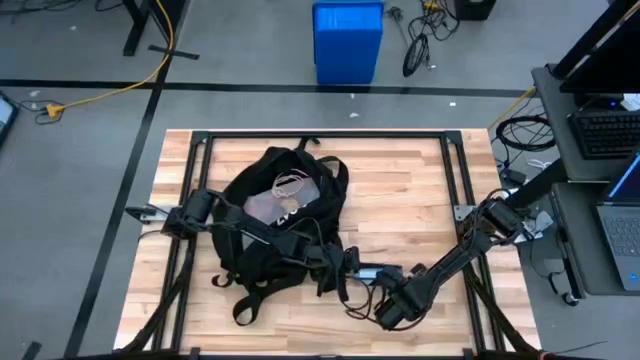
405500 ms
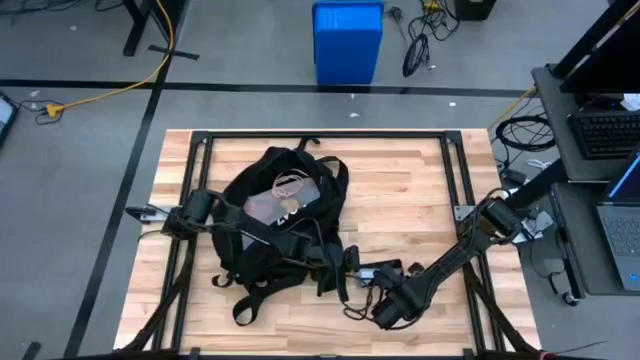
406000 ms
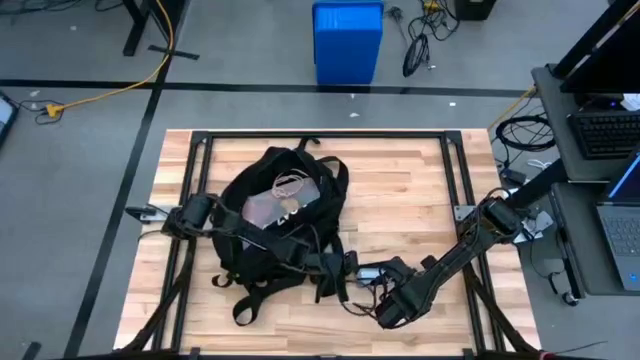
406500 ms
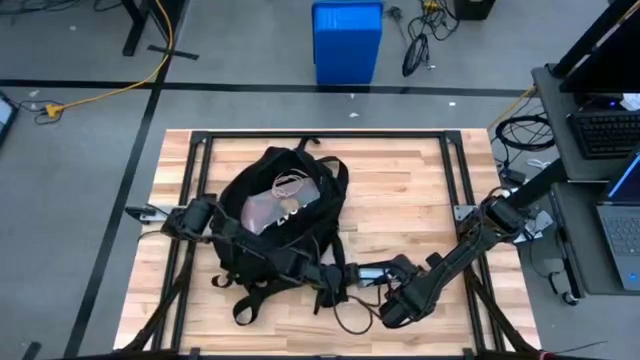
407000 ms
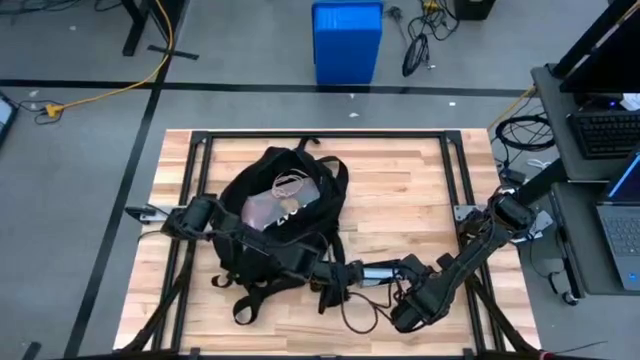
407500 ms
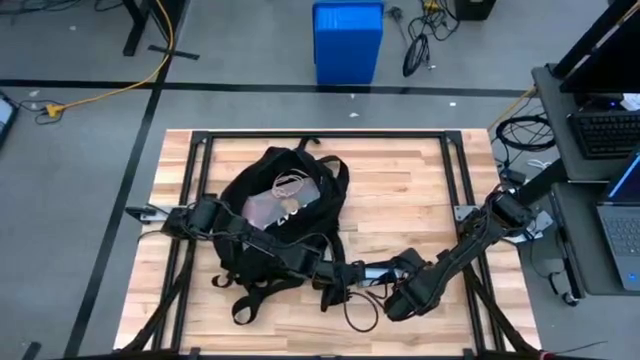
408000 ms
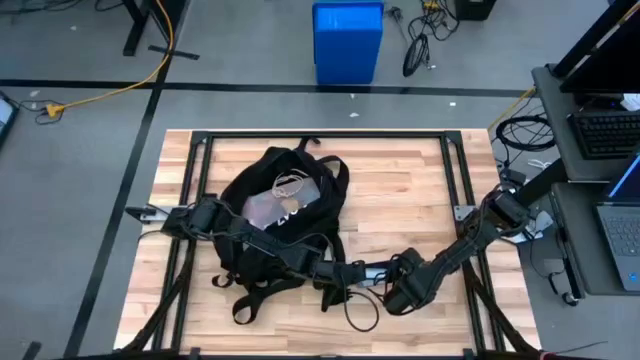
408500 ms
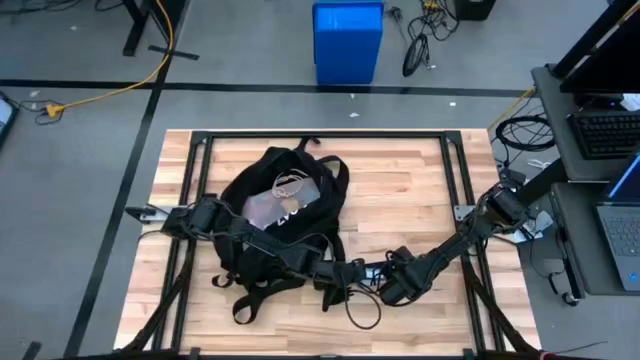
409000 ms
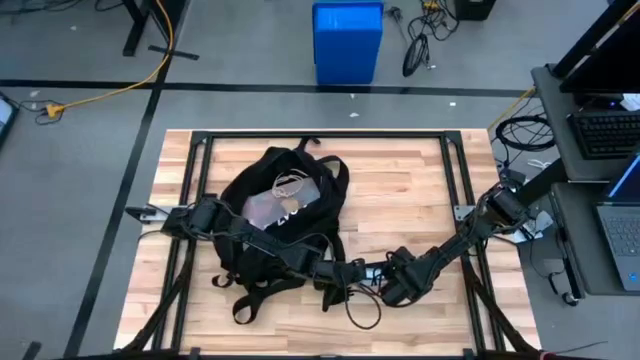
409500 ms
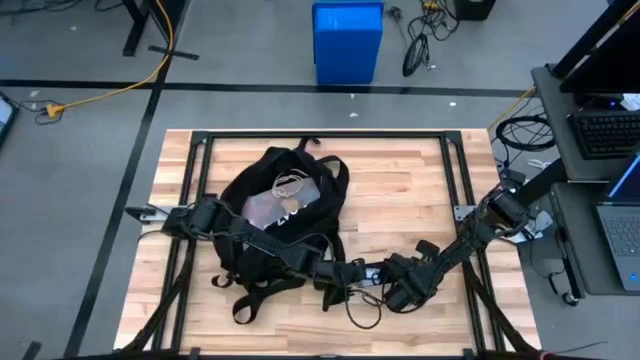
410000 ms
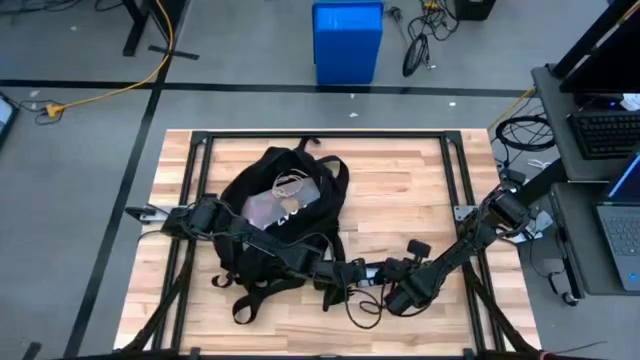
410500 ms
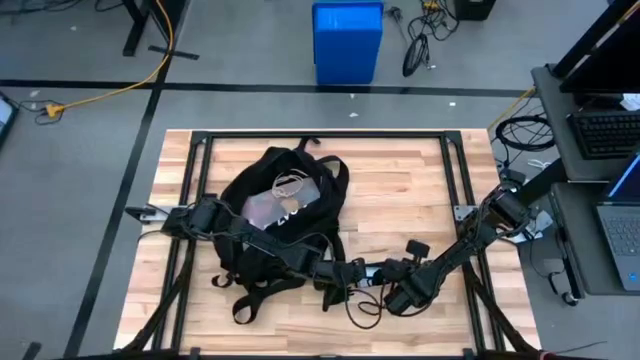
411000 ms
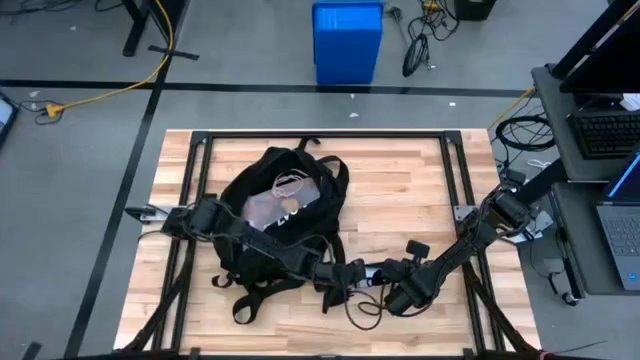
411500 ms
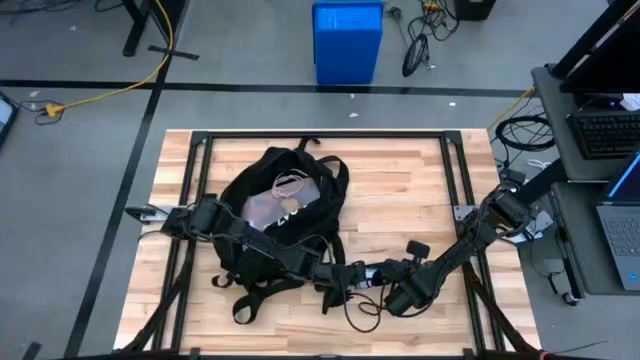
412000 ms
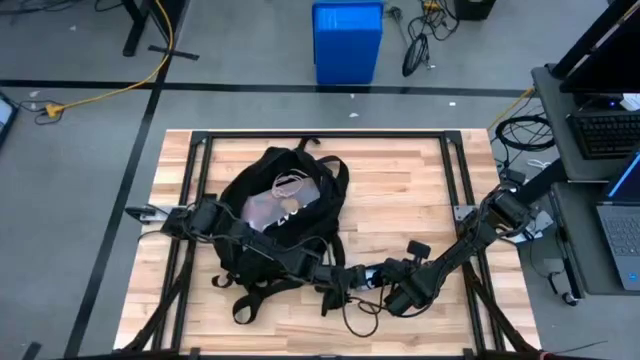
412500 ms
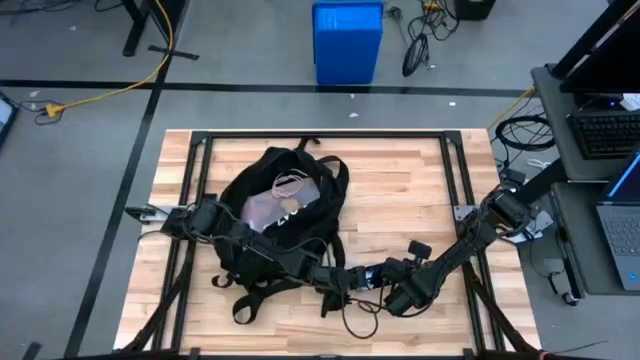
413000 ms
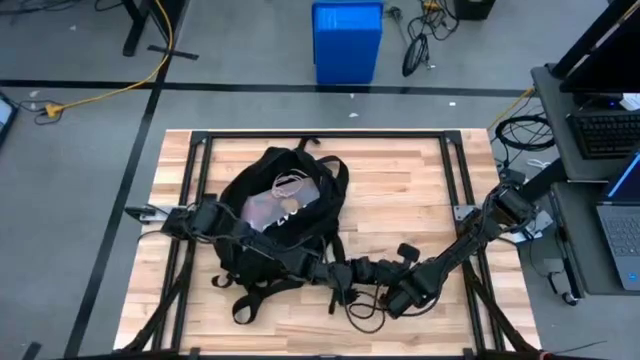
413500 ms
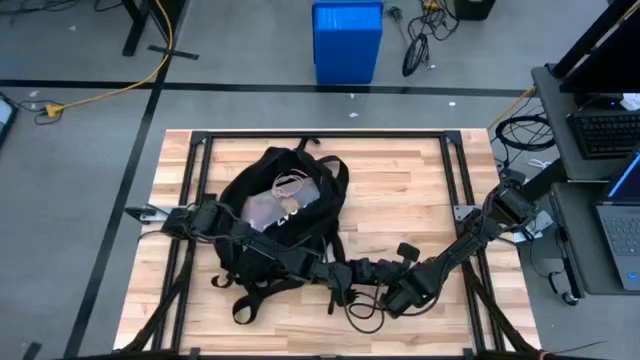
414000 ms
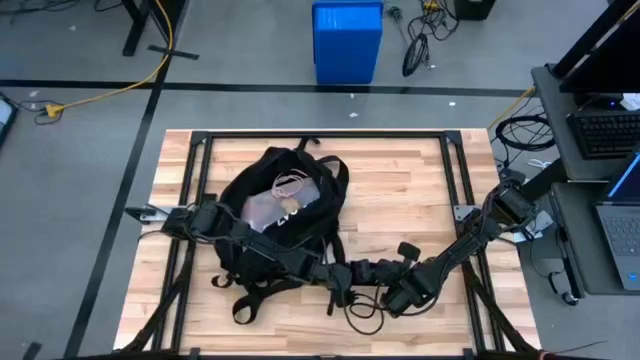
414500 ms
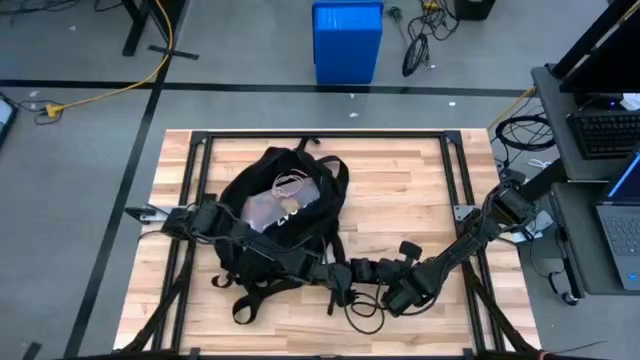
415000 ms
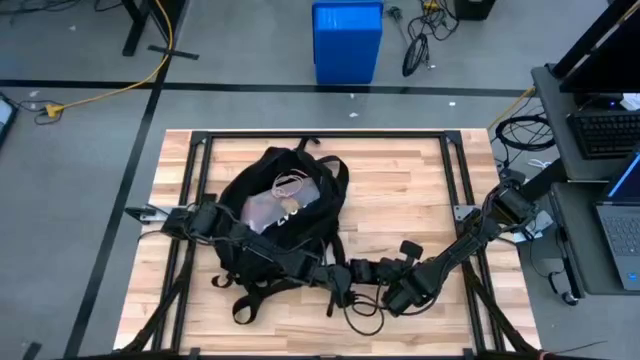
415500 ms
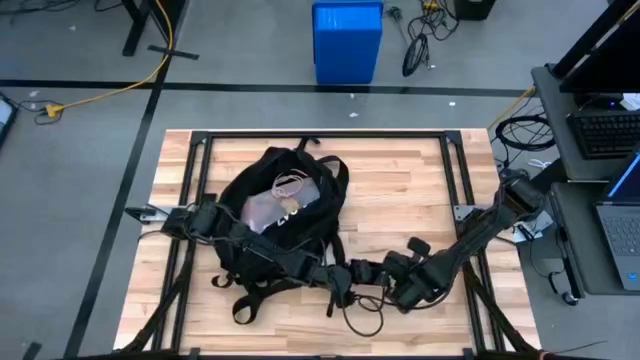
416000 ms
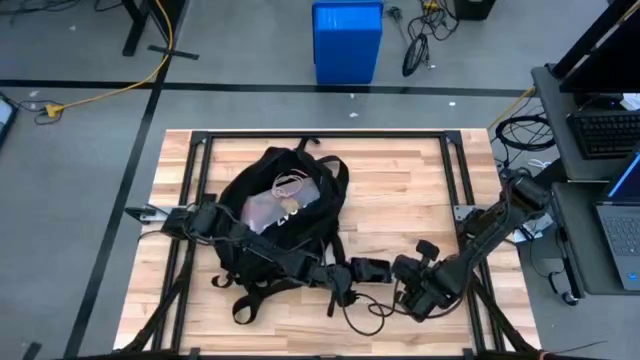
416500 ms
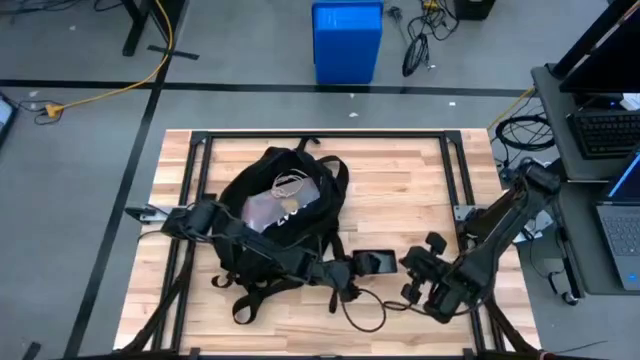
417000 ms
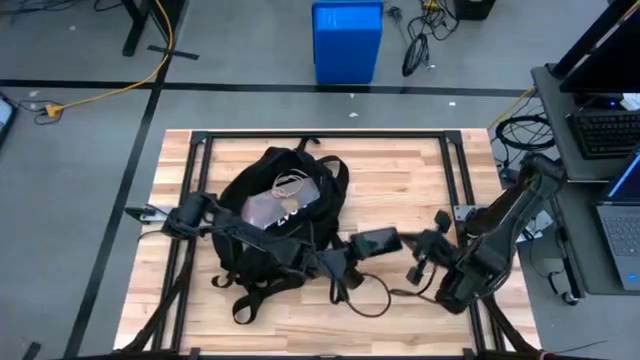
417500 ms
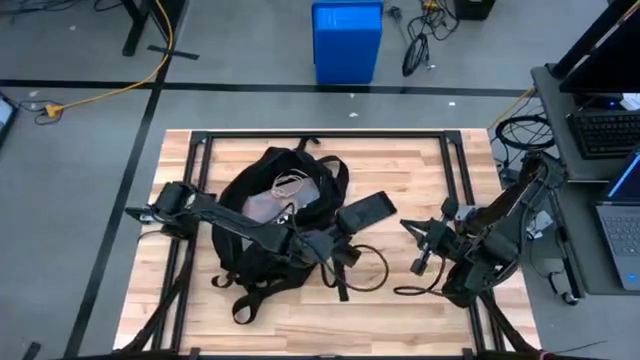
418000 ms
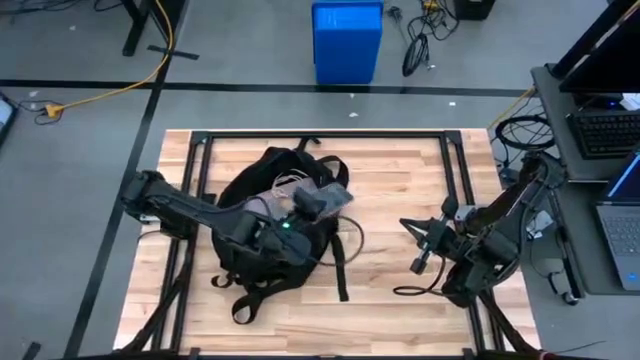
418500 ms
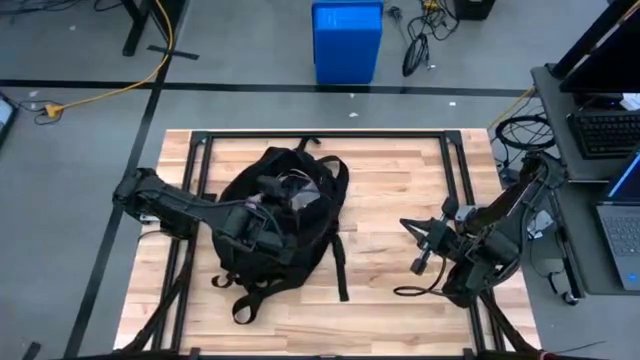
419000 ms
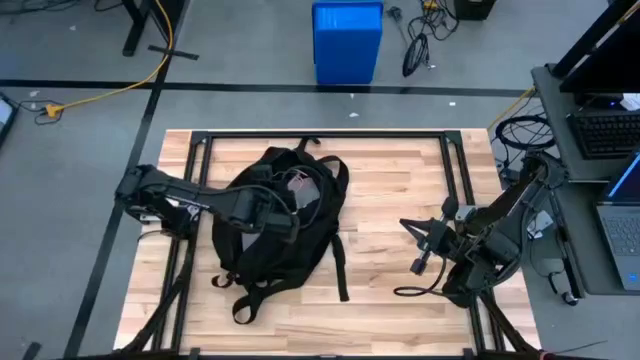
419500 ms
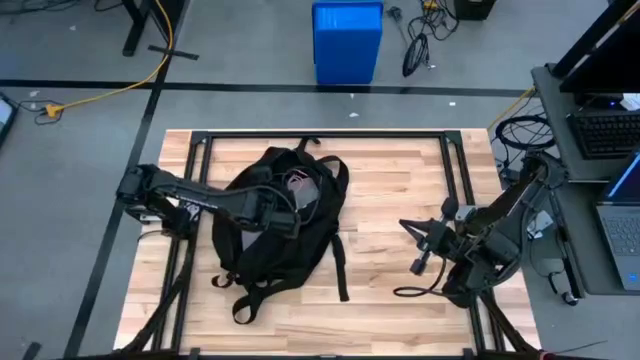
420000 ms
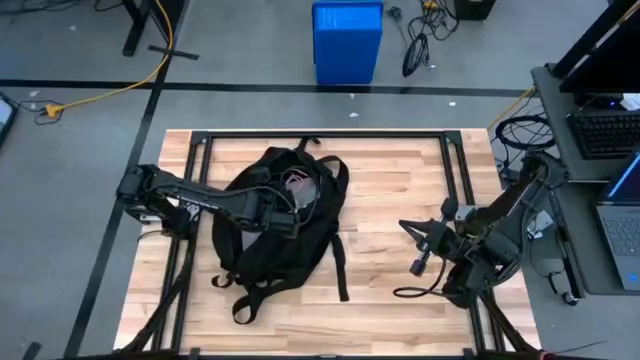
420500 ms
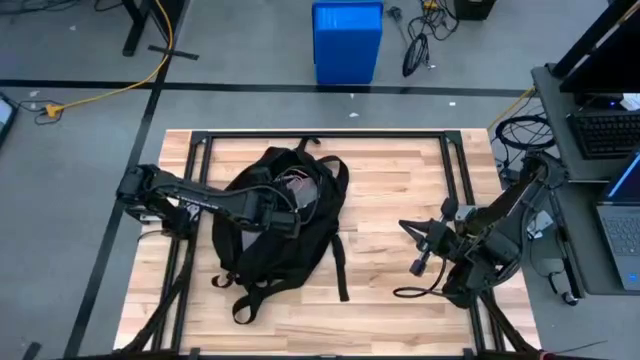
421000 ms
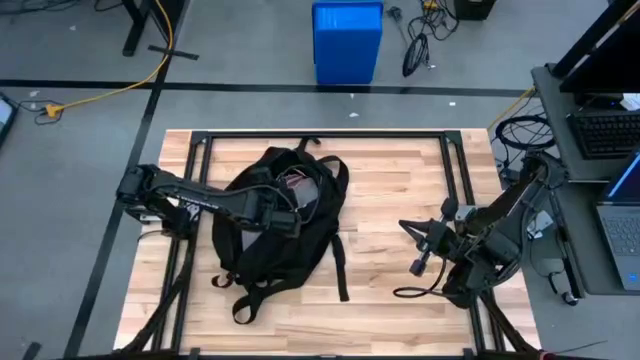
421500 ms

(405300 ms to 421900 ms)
Task: Unpack backpack
Put the cellphone into the black backpack

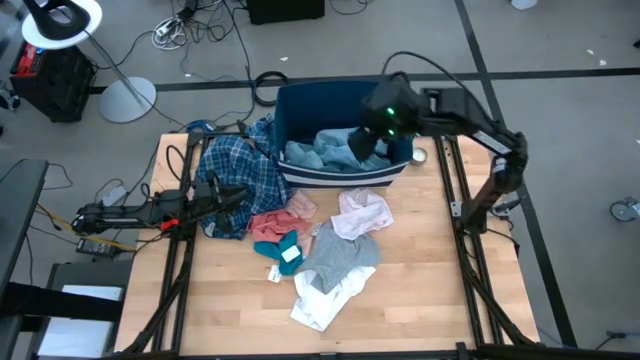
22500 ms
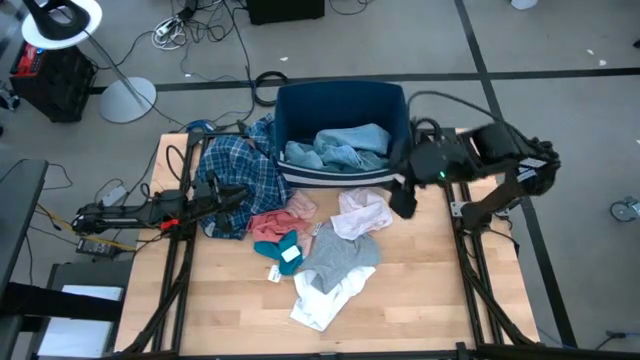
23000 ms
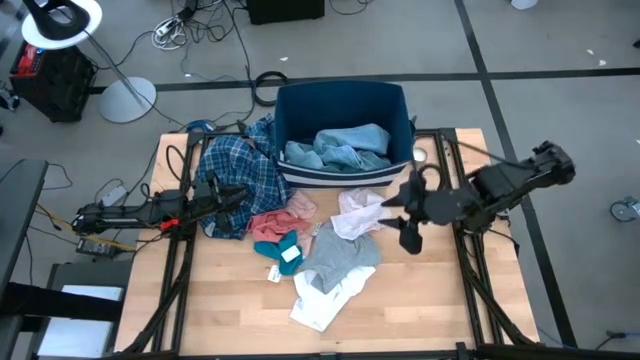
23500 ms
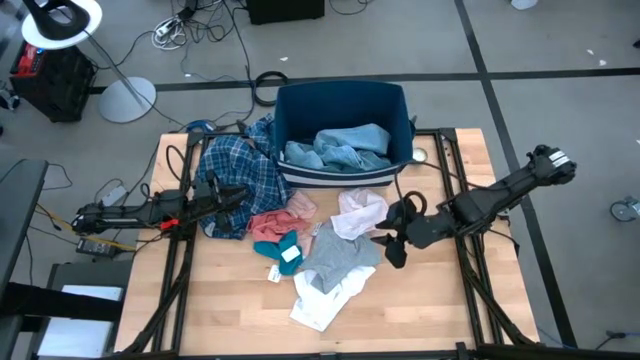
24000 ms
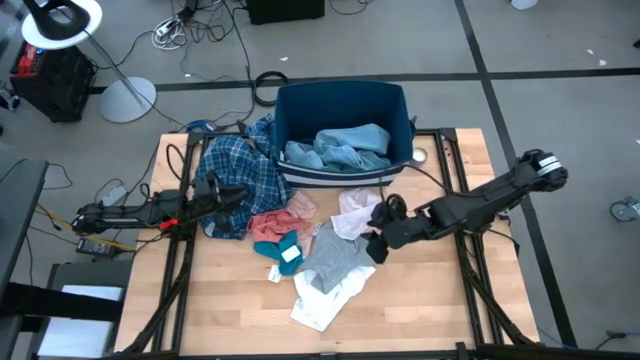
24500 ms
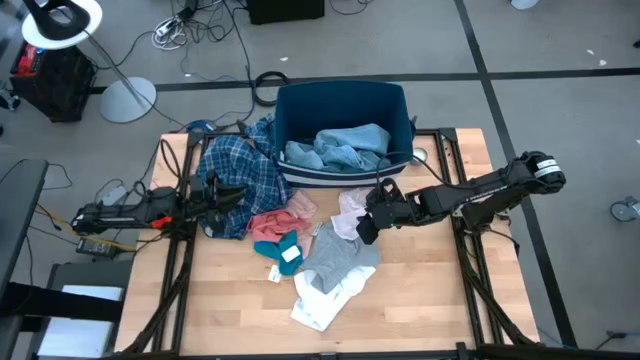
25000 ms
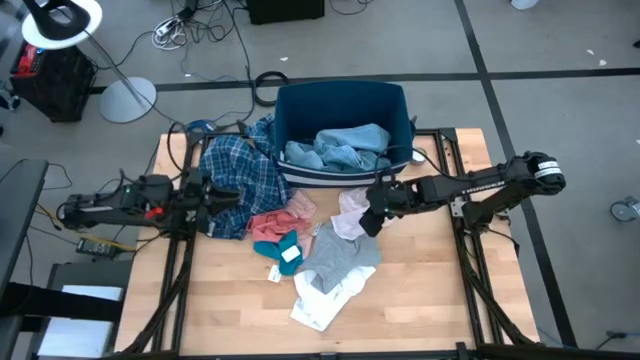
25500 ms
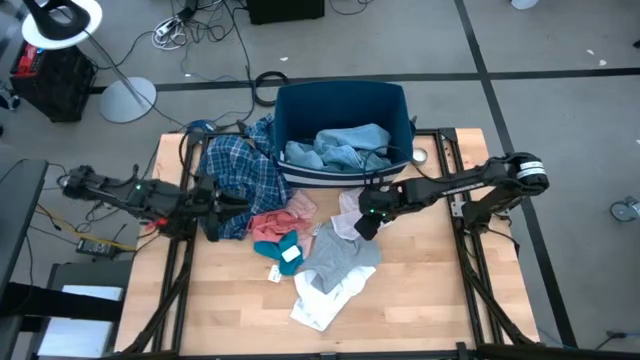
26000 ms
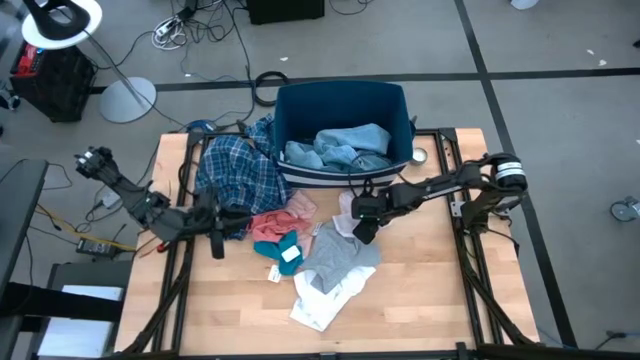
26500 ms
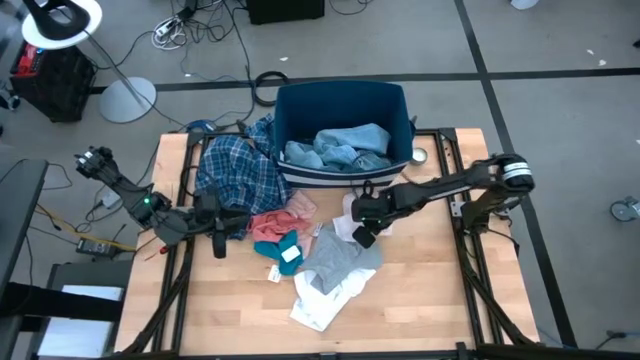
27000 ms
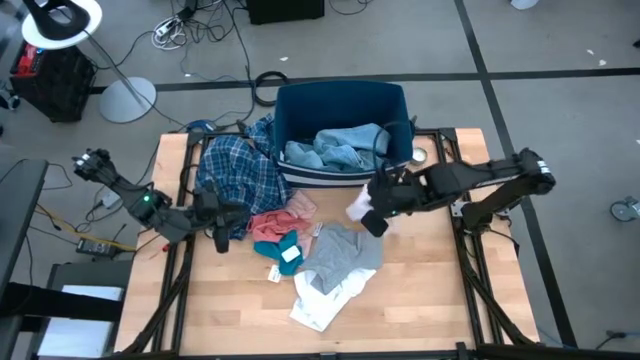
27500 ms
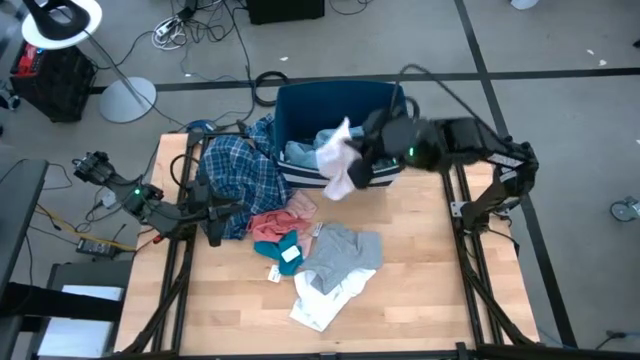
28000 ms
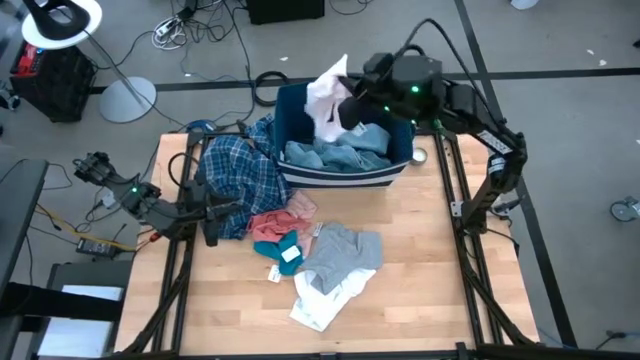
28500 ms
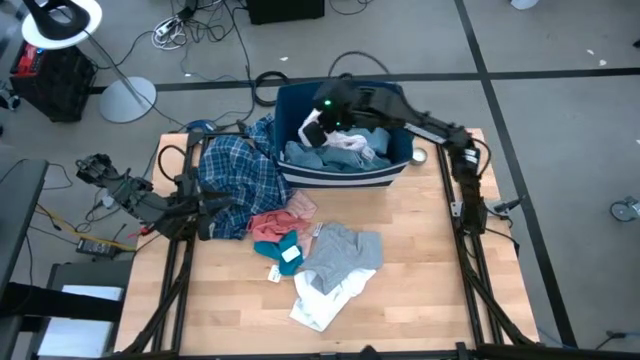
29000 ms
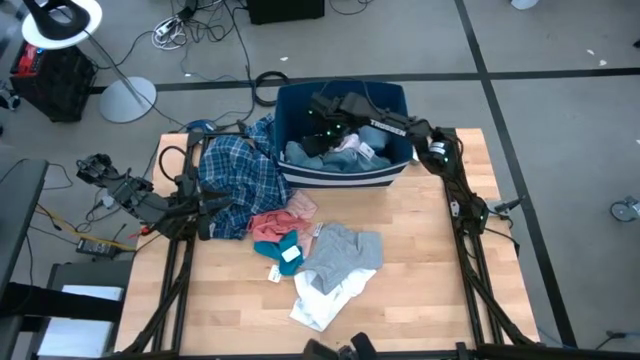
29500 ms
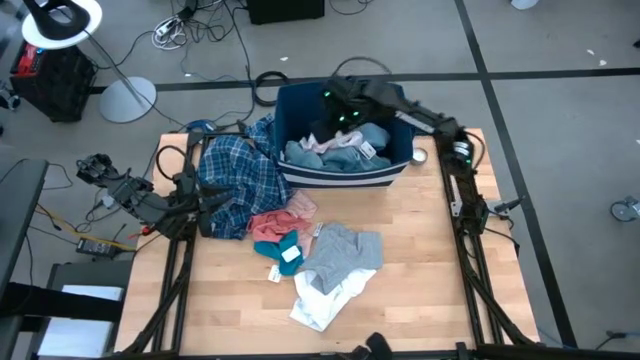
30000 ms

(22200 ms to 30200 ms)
Task: Sort clothes
Put the white underwear into the blue bin
